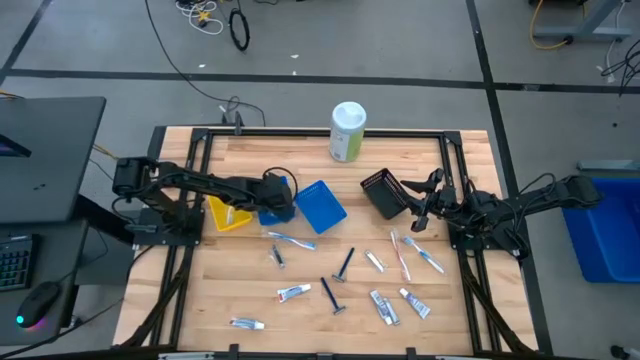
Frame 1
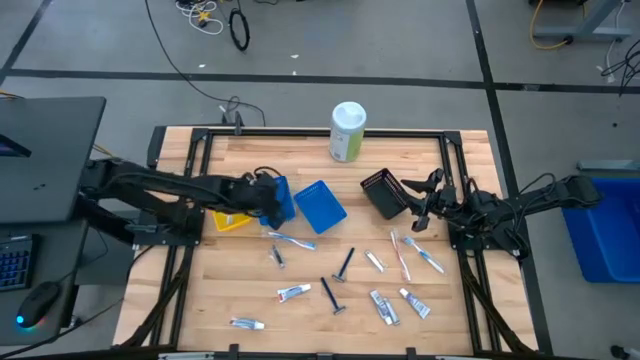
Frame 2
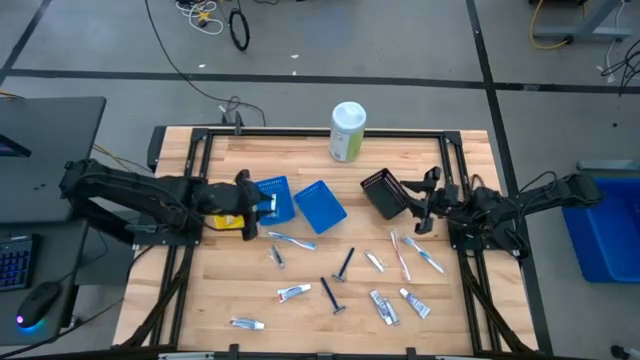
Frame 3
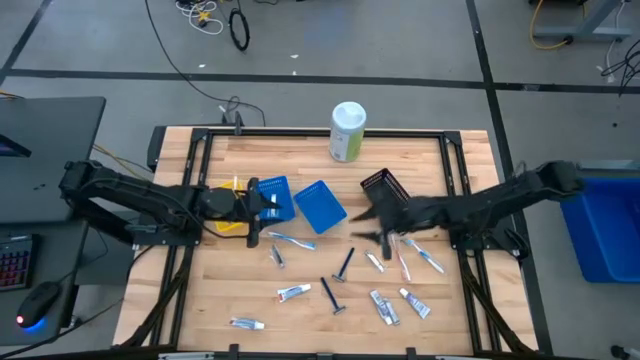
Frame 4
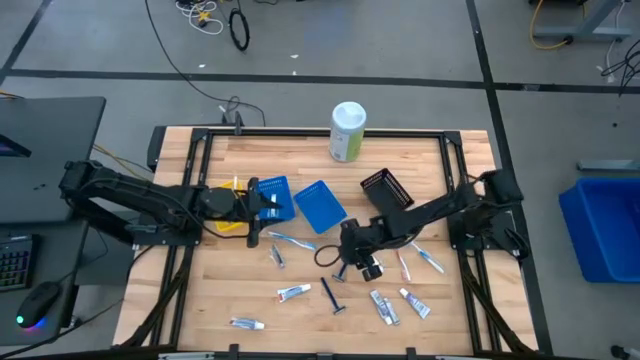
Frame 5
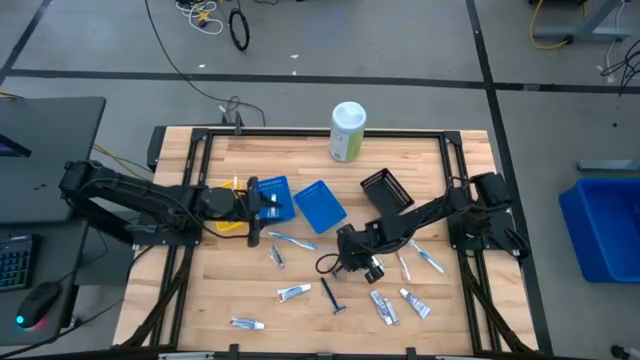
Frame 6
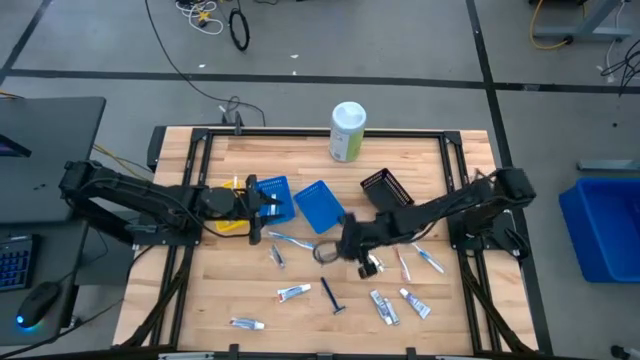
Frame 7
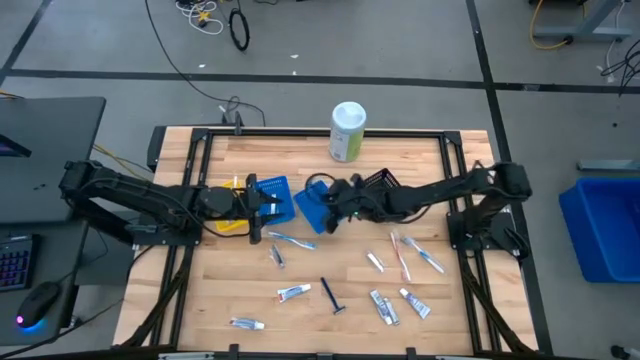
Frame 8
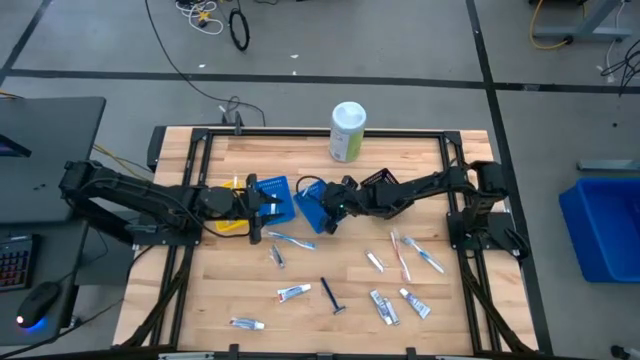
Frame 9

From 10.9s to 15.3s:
Task: Pick & Place Travel size toiletries
Put the top blue razor into the right blue bin

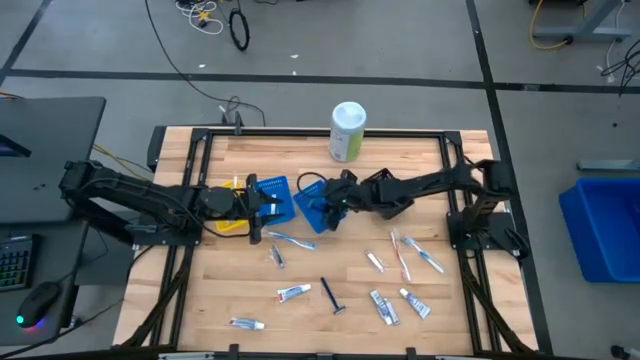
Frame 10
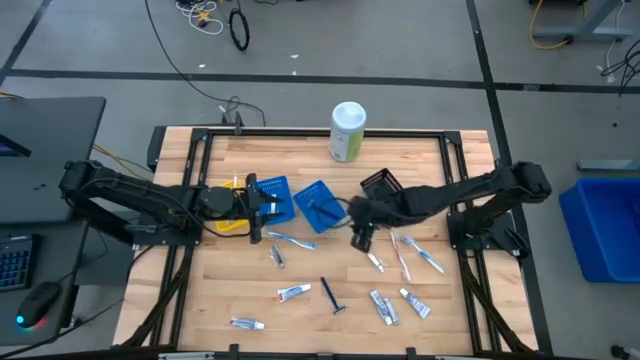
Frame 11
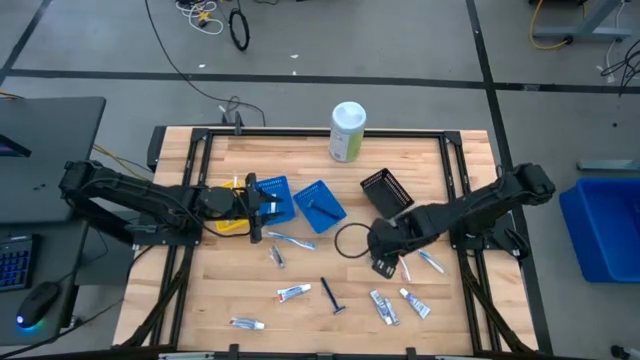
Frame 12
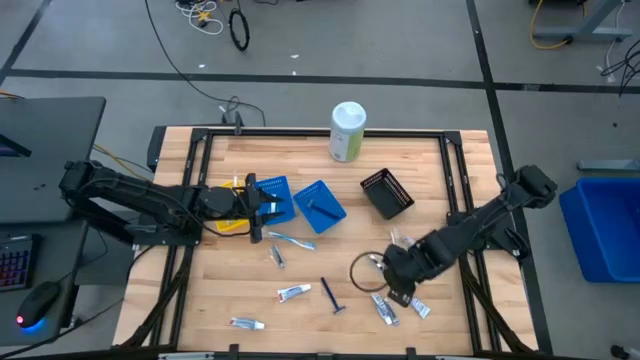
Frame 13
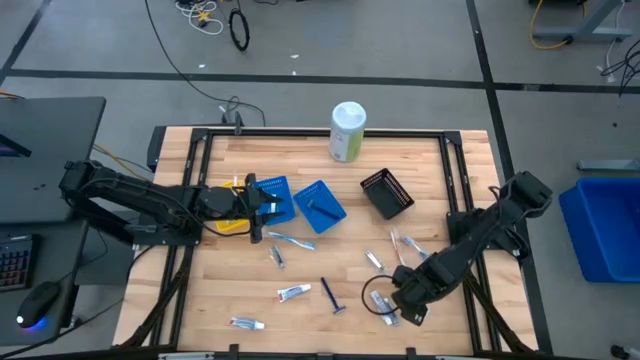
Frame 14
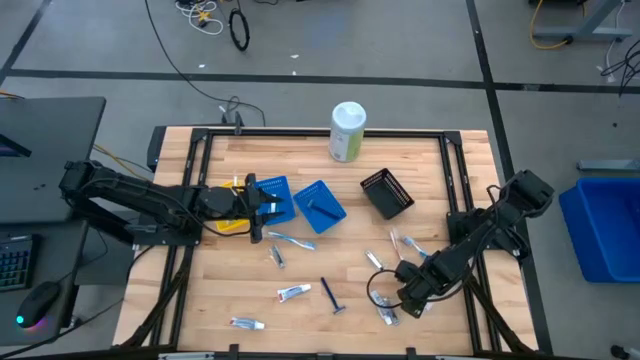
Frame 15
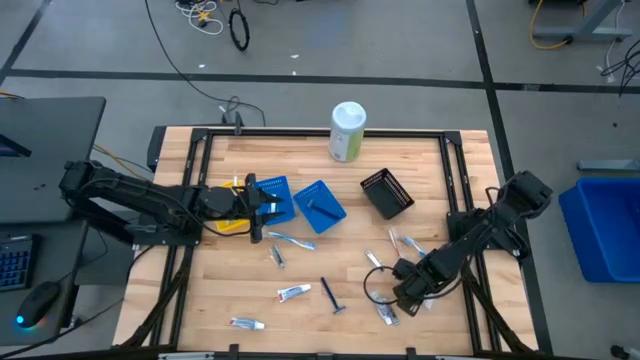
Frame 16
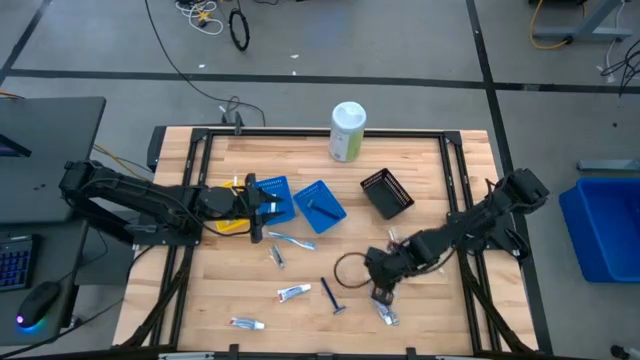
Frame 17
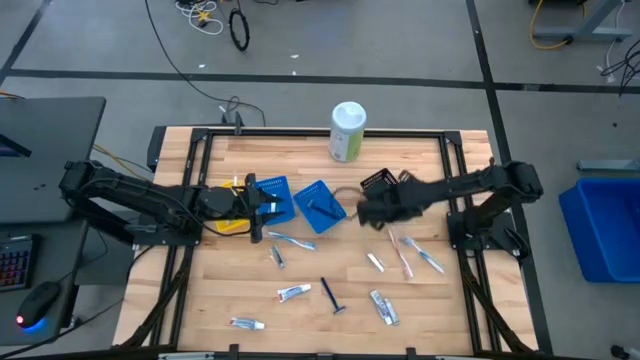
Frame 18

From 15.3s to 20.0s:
Put the white toothpaste into the black bin

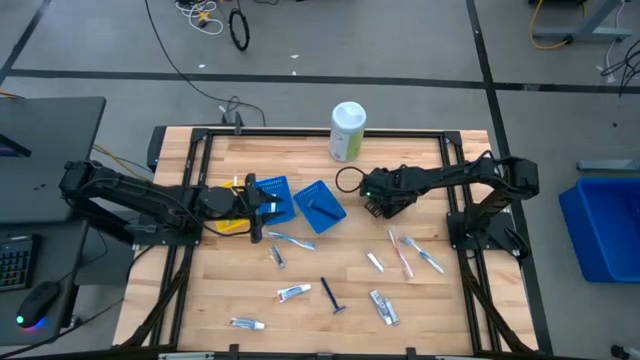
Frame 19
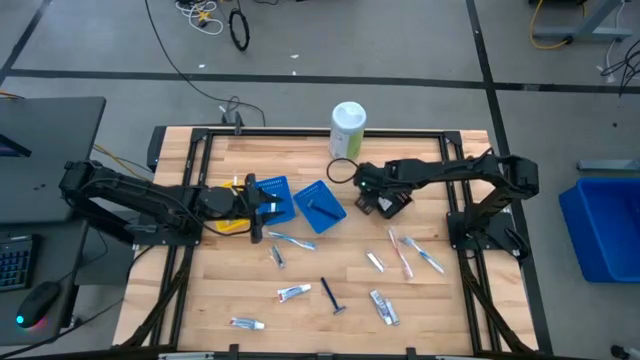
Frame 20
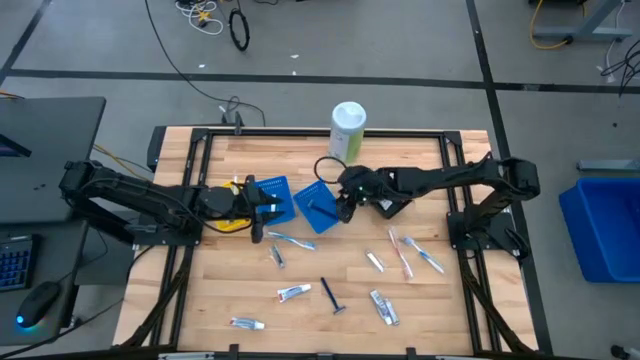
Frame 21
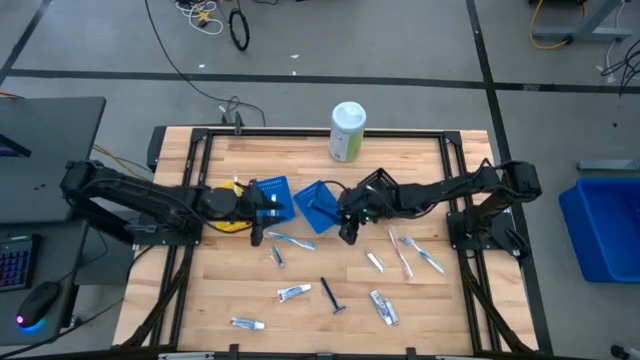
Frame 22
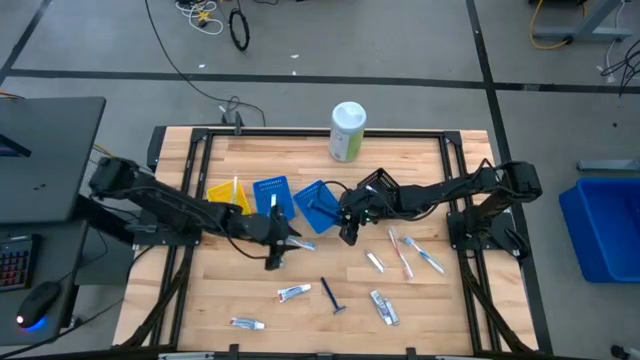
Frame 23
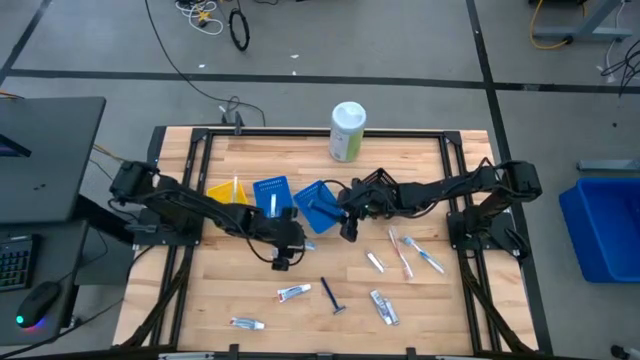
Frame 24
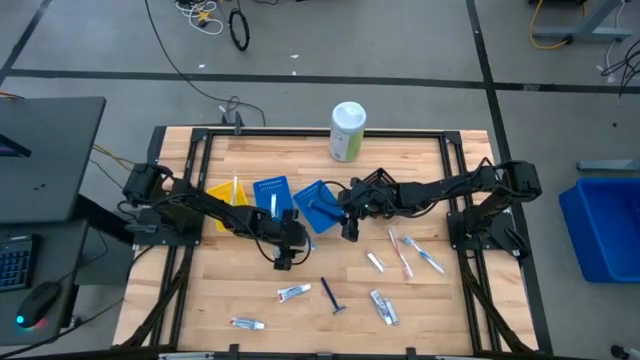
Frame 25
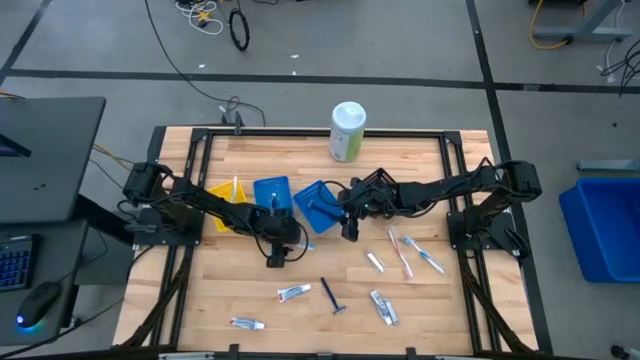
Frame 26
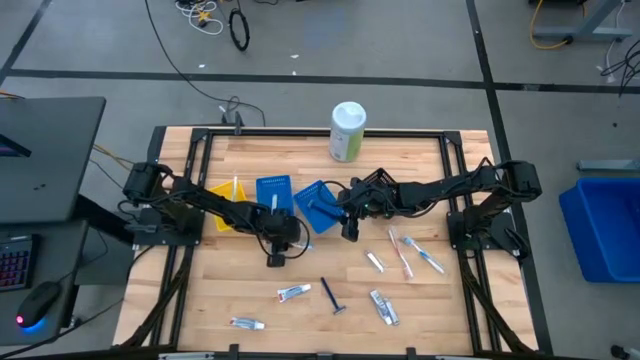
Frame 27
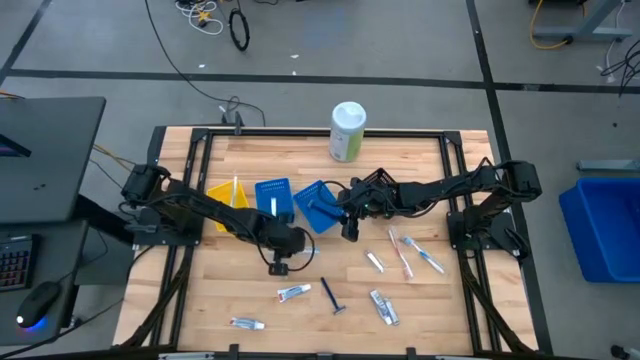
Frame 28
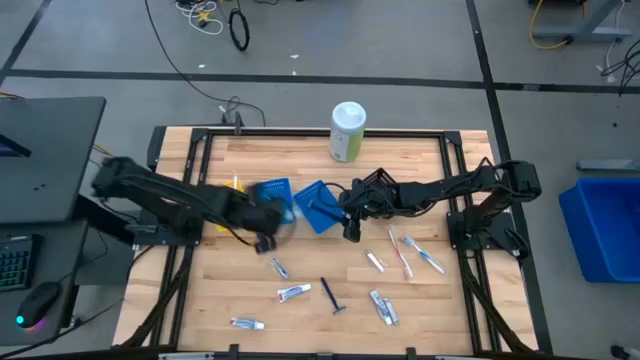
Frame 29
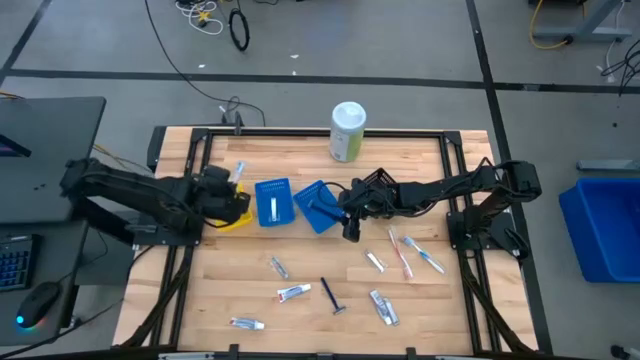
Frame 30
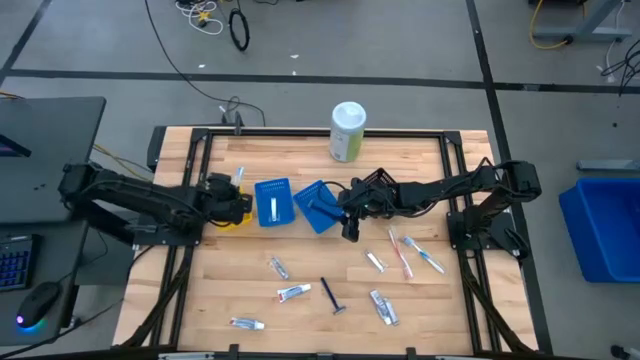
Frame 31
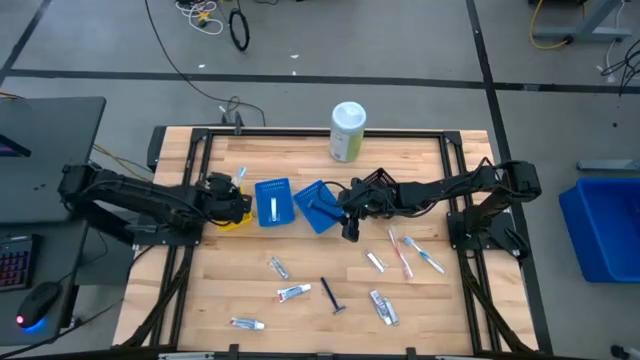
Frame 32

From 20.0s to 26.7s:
Put the blue toothbrush into the yellow bin

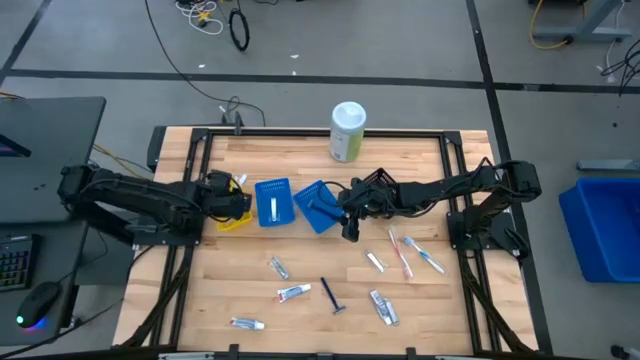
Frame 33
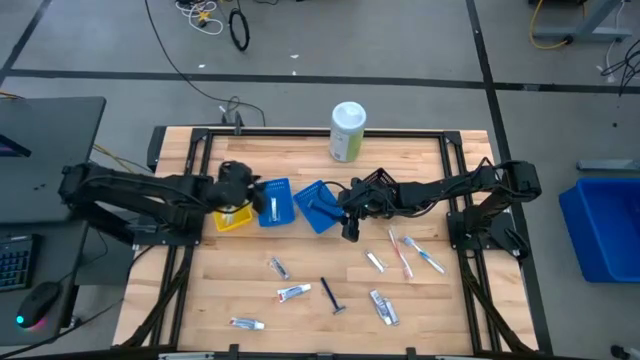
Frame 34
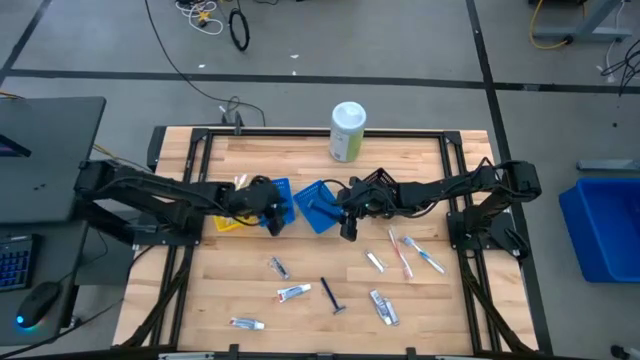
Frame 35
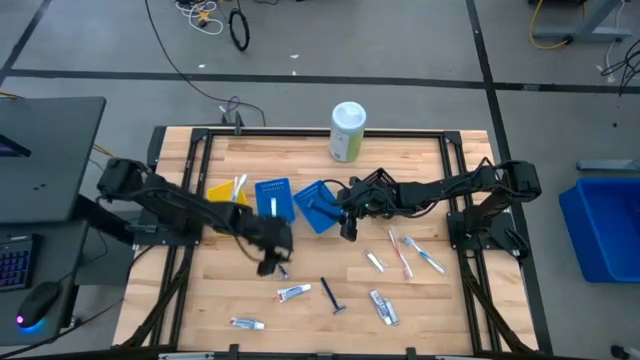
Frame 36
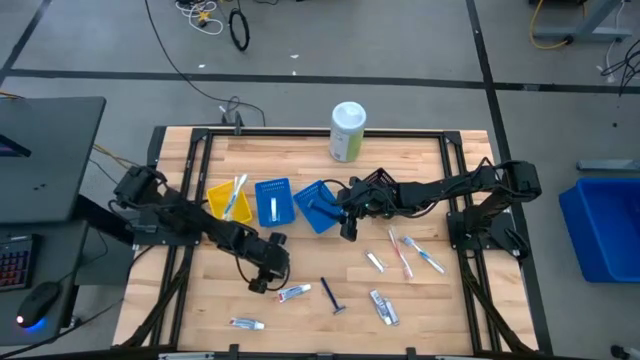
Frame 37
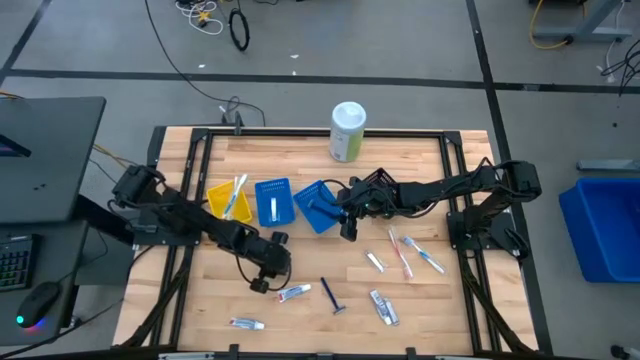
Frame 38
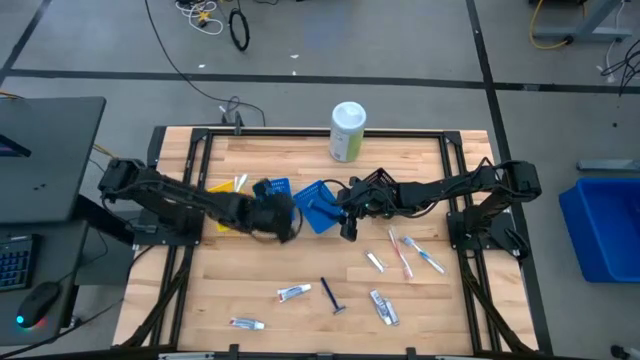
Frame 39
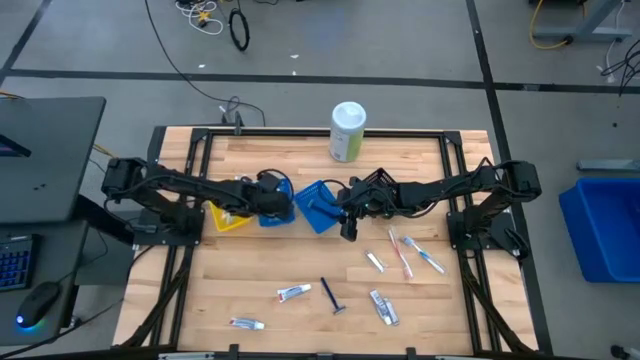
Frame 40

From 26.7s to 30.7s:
Put the left silver nail cutter into the left blue bin

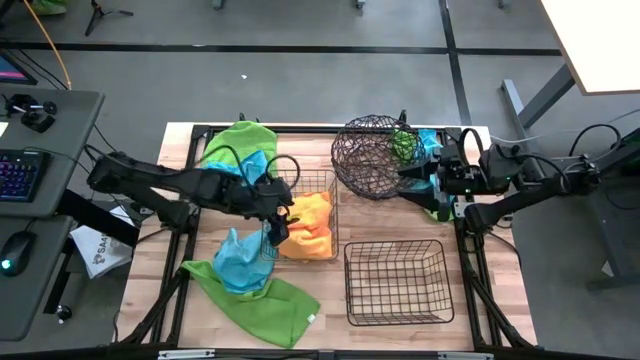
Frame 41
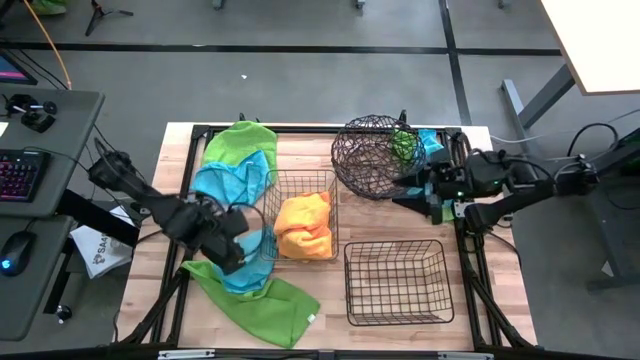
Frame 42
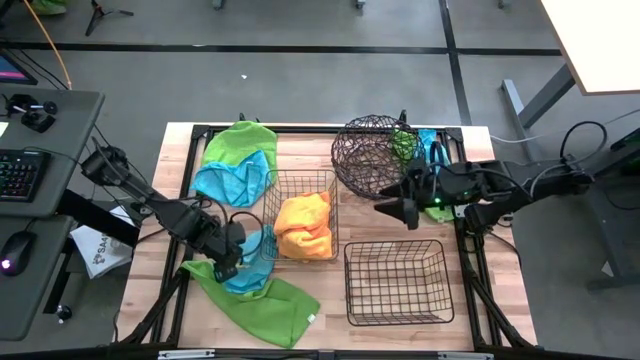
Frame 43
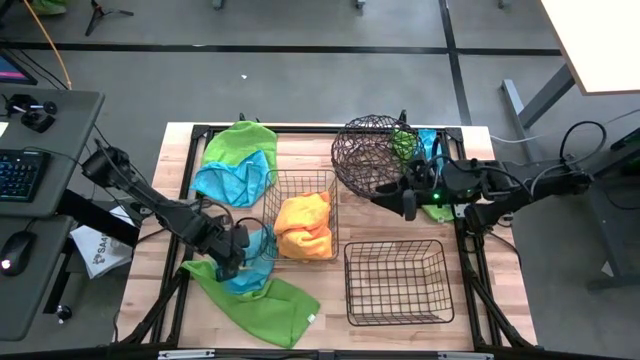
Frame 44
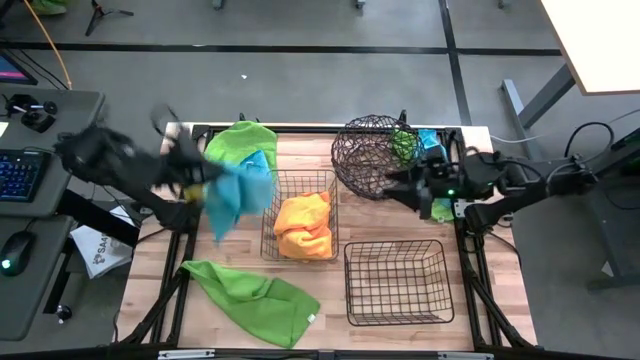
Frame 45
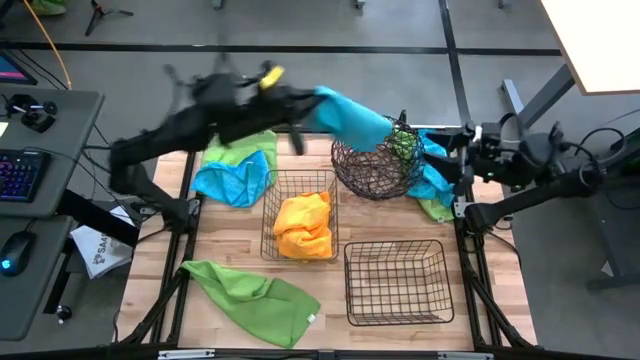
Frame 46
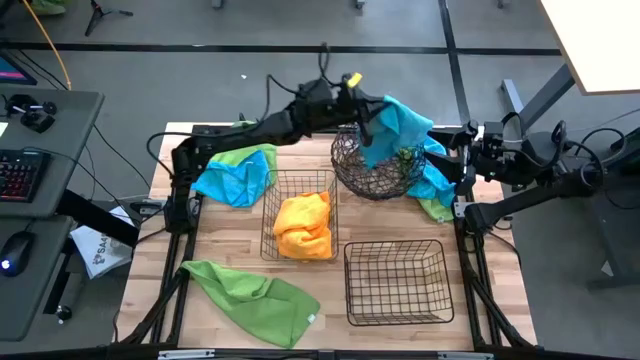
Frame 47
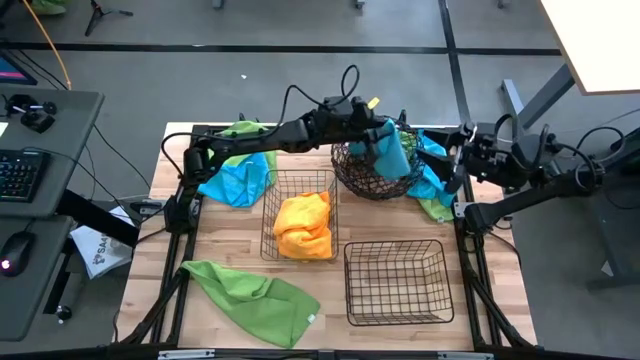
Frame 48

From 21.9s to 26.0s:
Task: Sort microfiber towel by color & place in baskets
Put the middle left blue microfiber towel into the top right black metal basket
